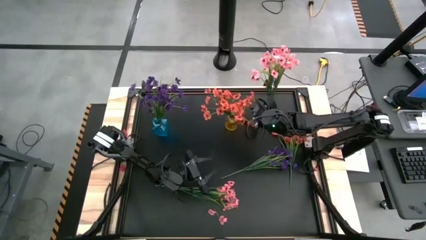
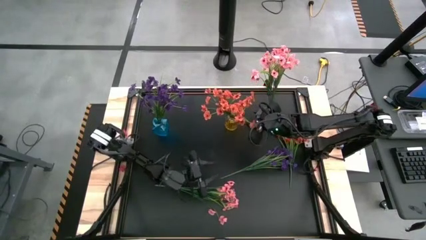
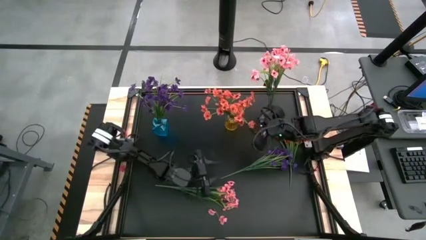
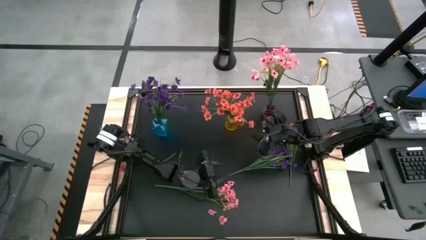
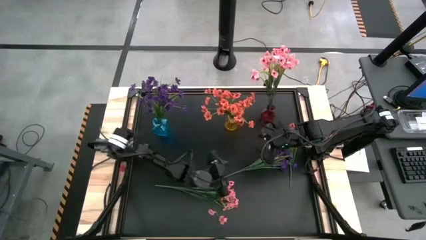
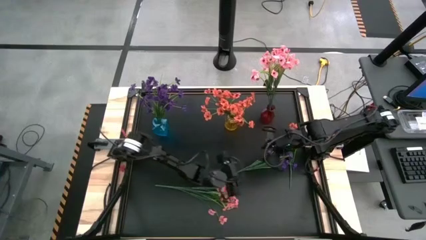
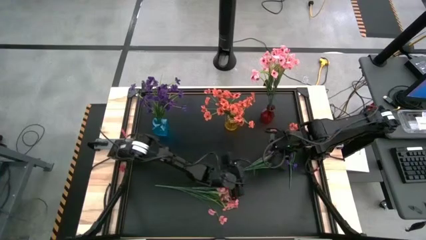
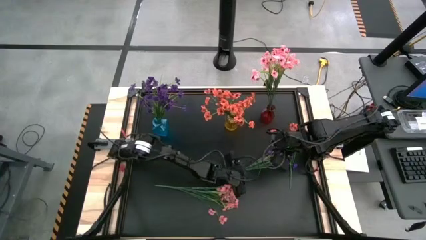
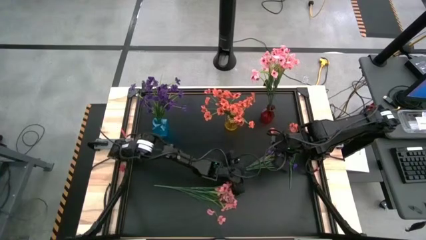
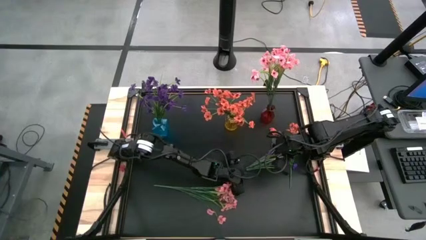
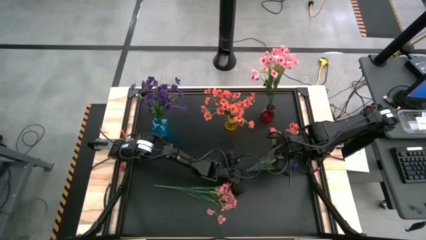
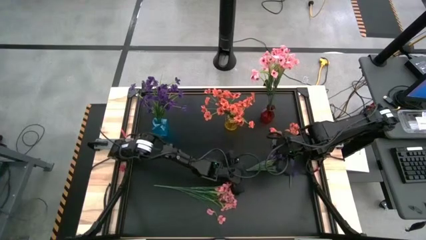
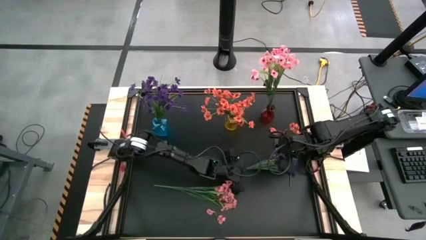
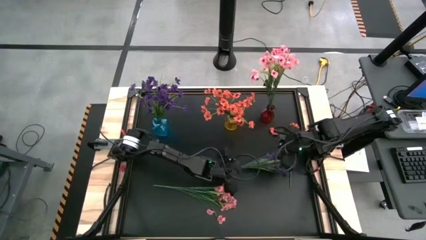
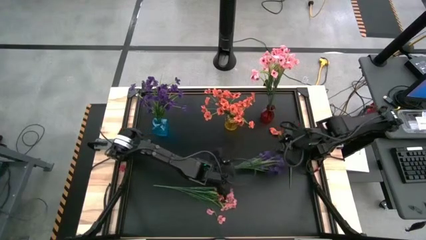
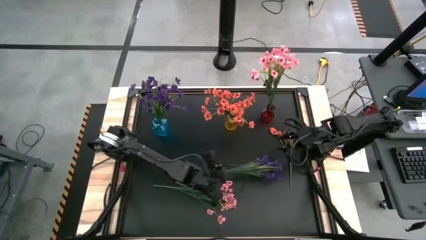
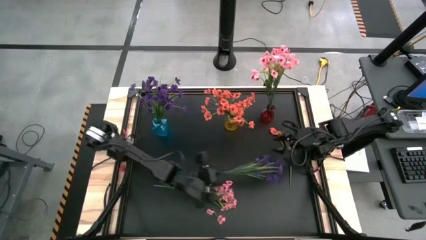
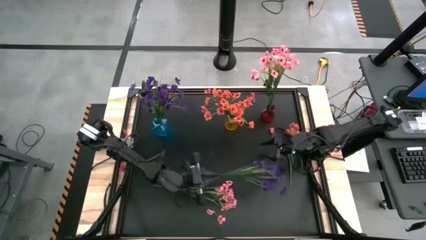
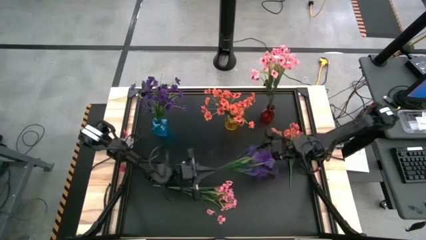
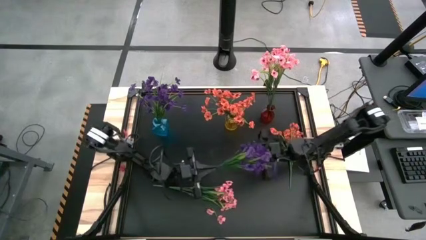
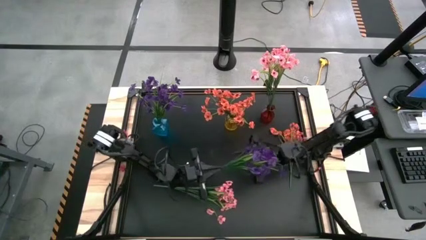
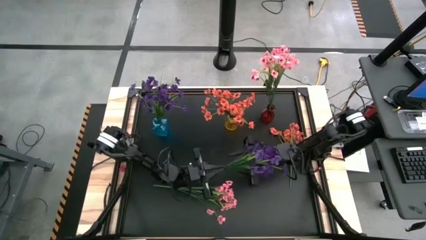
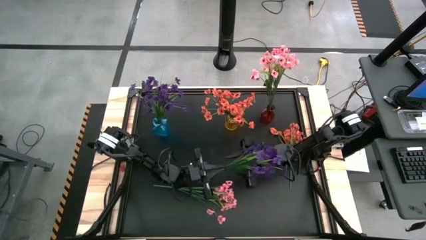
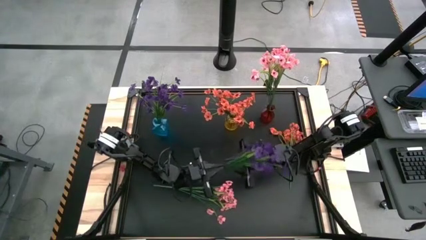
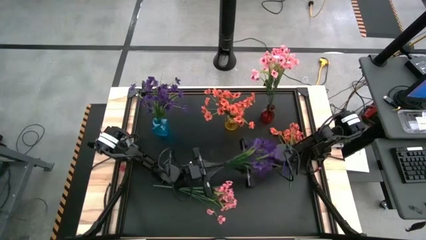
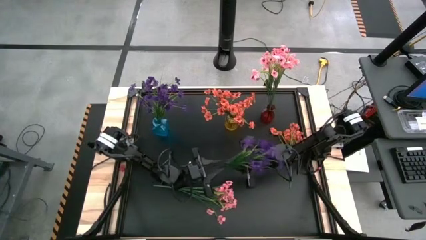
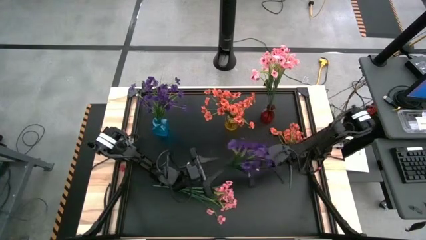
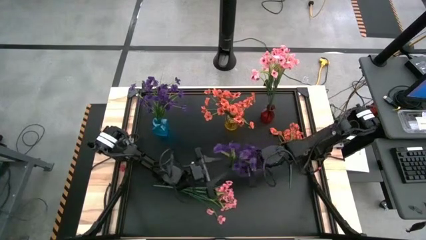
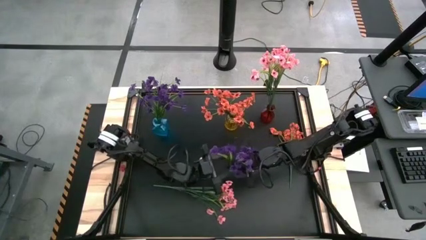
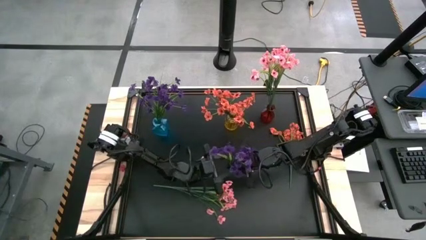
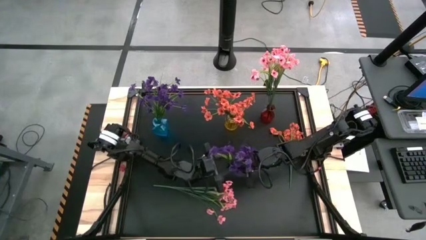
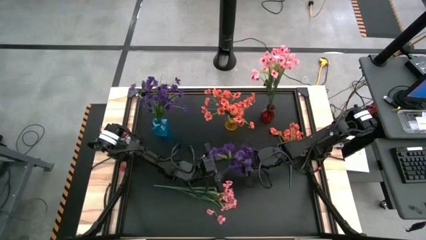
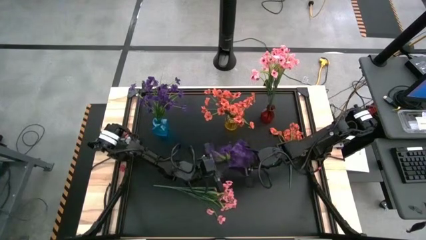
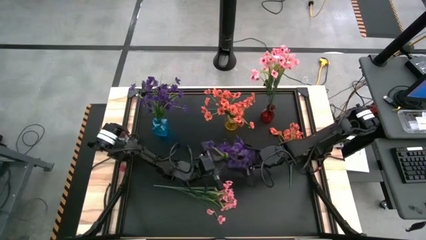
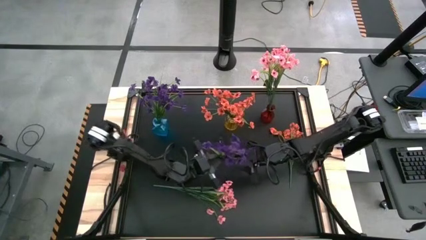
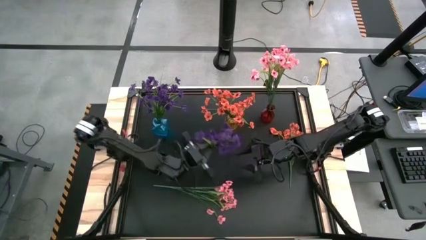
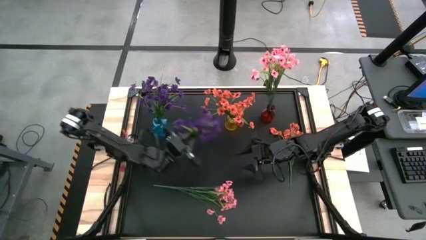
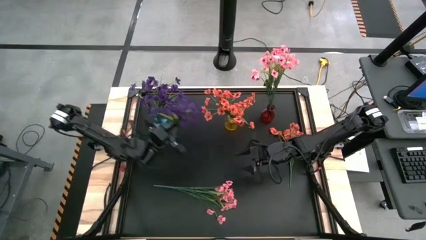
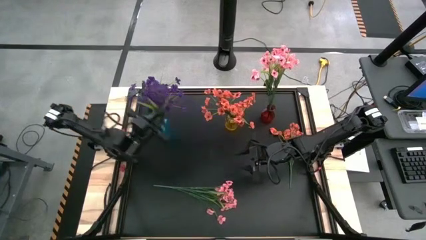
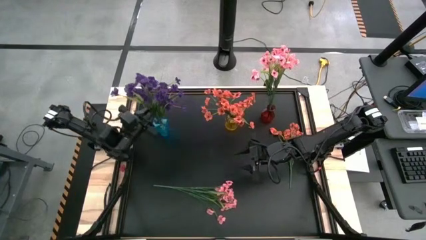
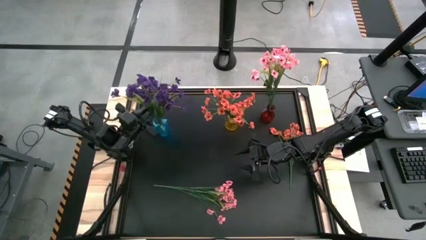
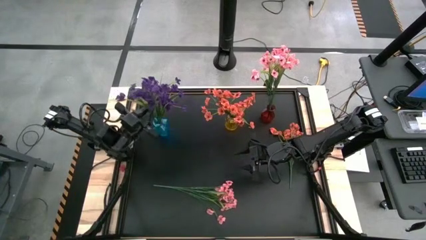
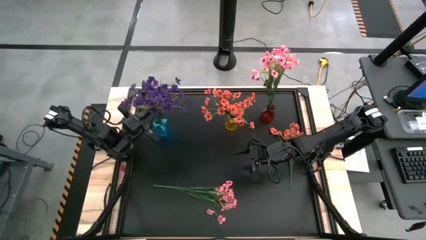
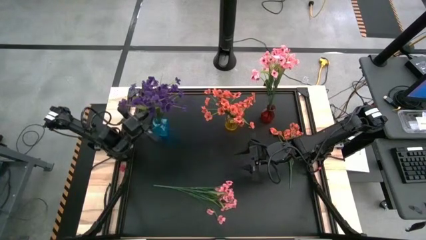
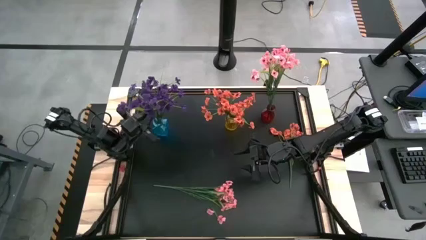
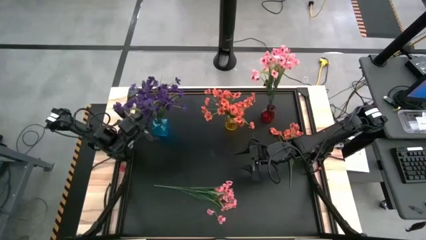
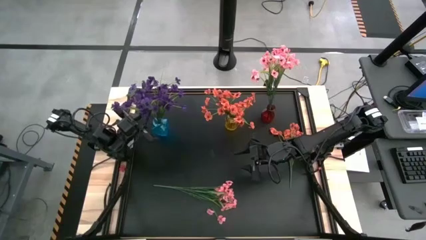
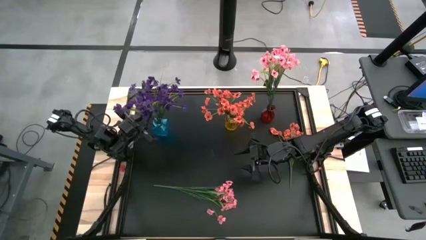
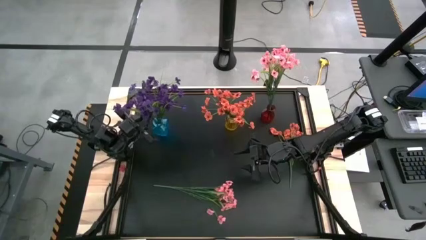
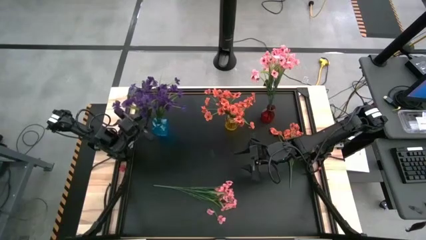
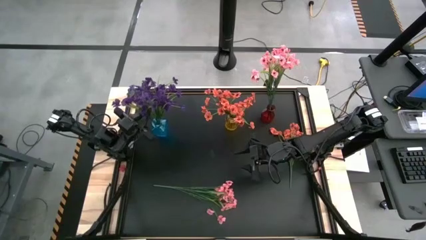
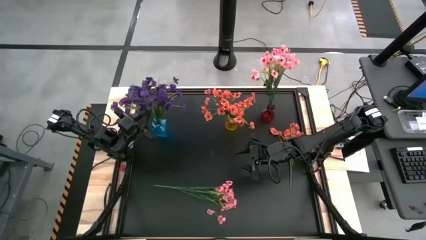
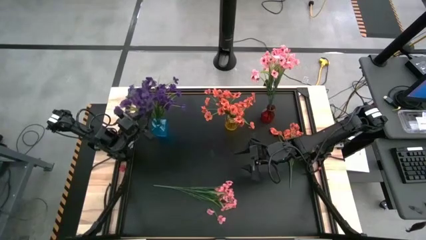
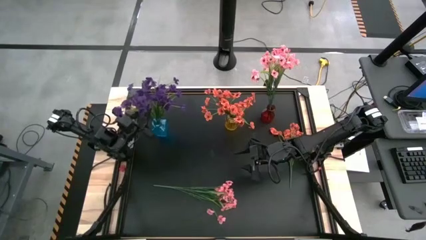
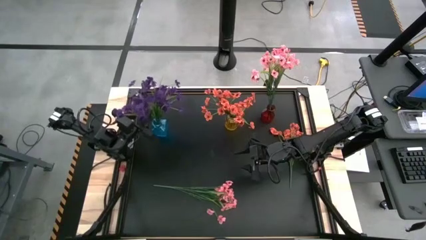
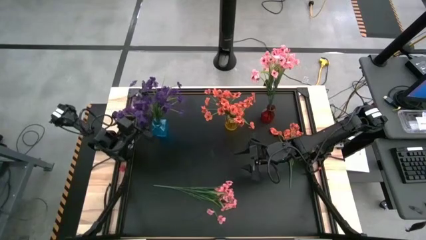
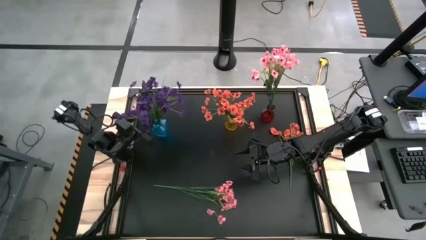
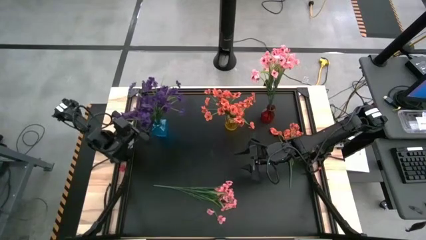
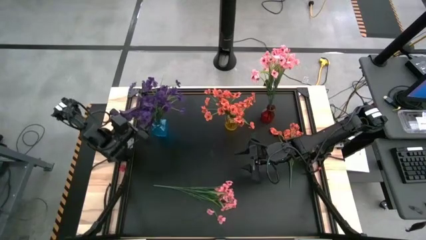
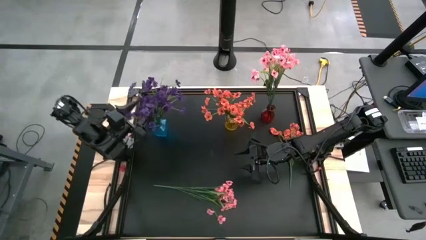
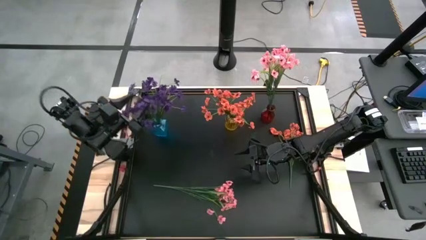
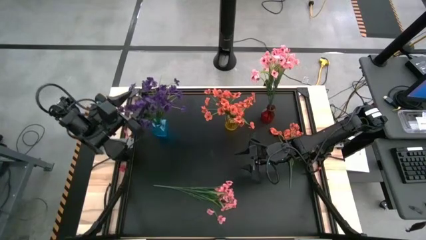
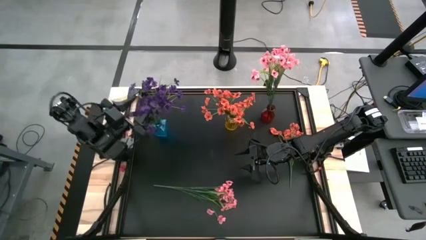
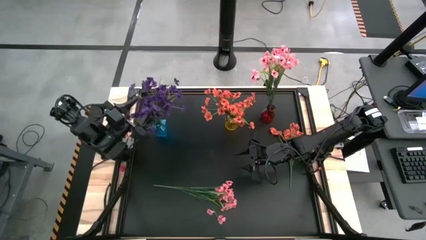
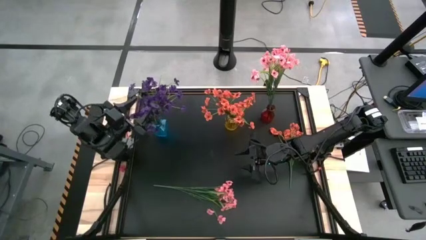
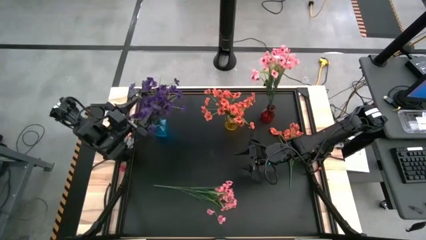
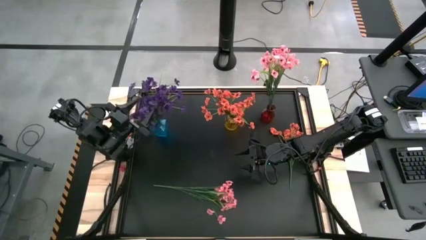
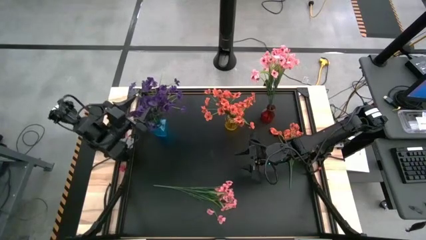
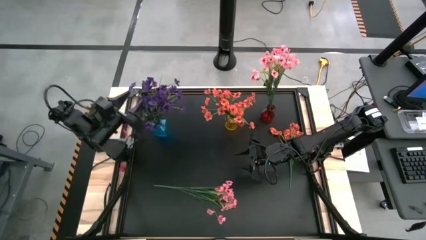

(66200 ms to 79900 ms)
Task: Sort flowers into vase by color
Put the violet flowers into the blue flower vase

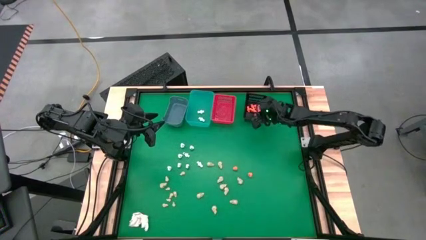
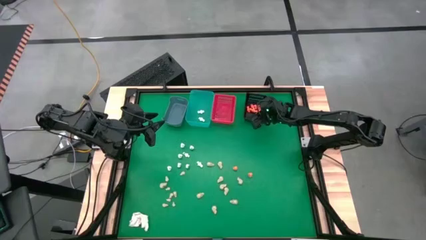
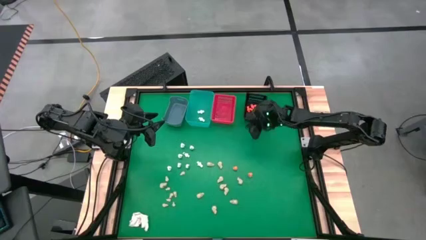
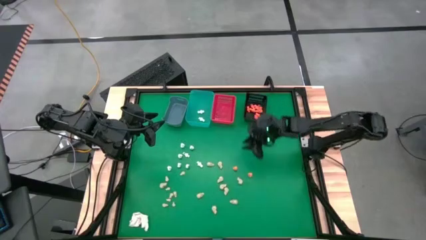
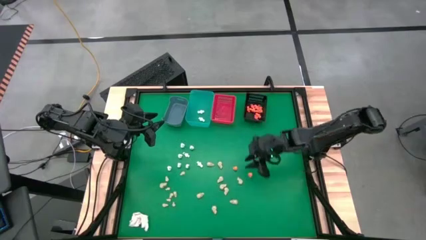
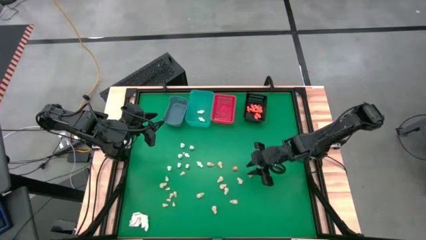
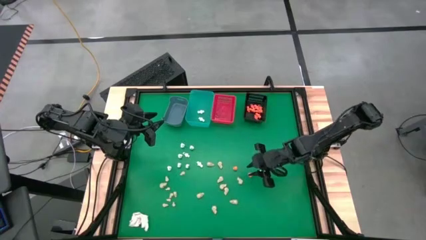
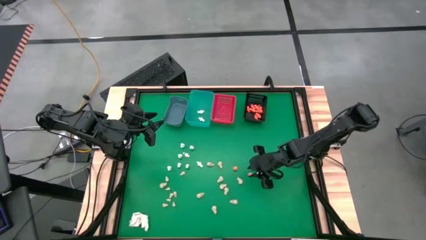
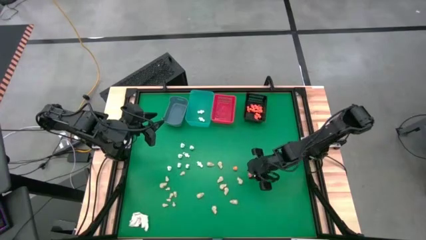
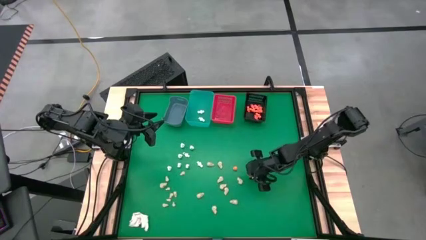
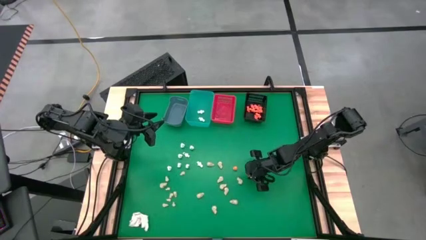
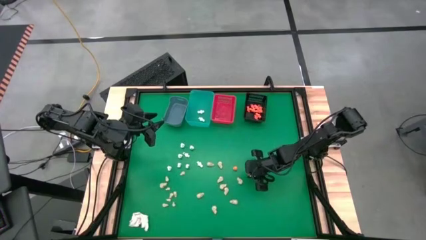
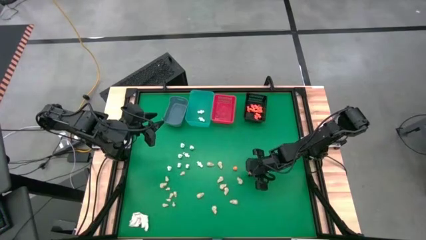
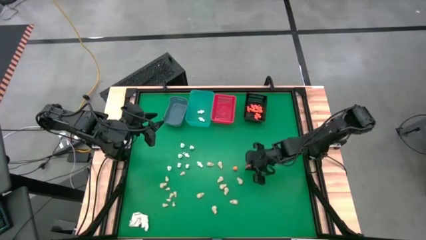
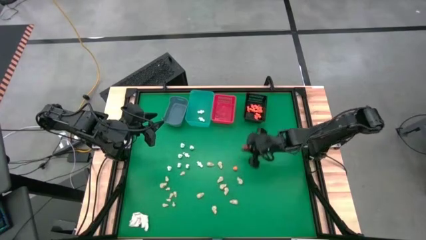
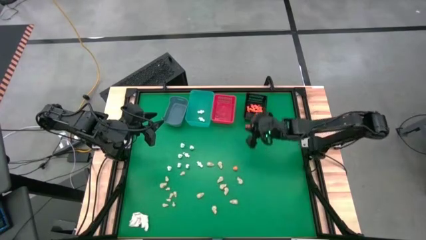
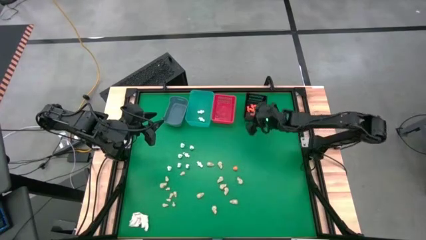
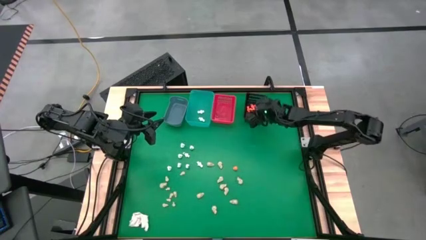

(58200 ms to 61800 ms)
Task: Sort Halloween decoration
Put the orange skeleton toy into the black bin
